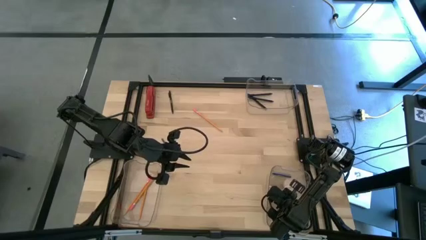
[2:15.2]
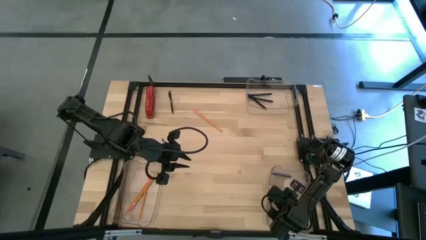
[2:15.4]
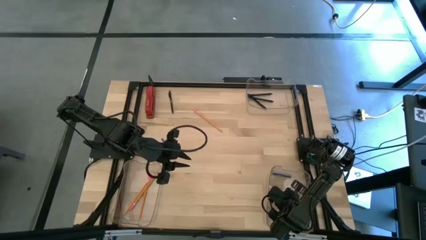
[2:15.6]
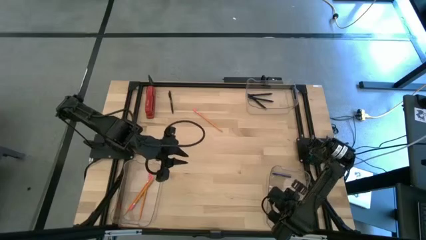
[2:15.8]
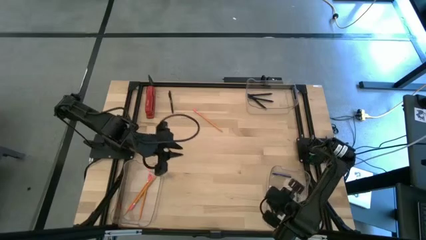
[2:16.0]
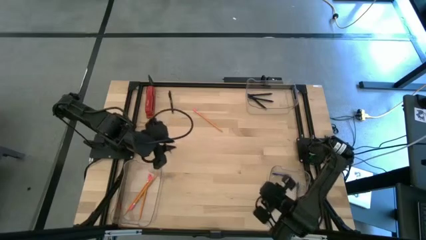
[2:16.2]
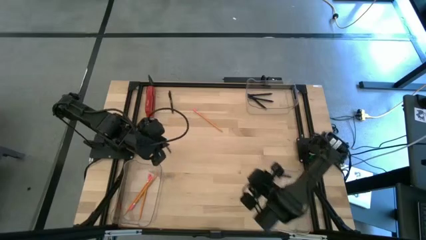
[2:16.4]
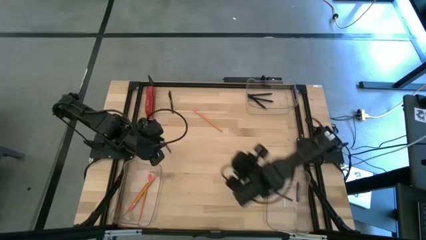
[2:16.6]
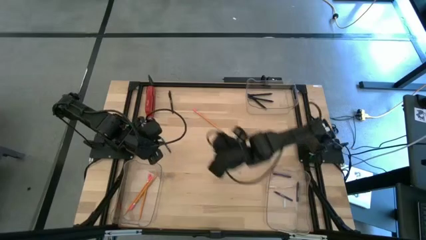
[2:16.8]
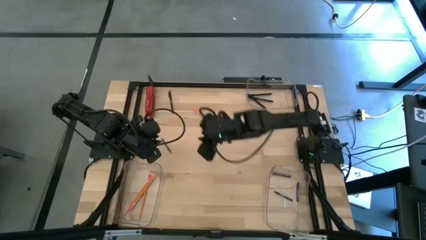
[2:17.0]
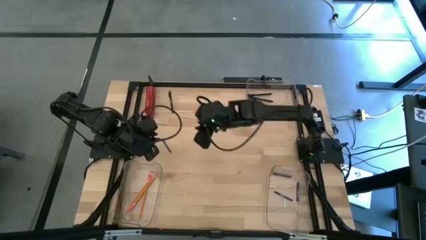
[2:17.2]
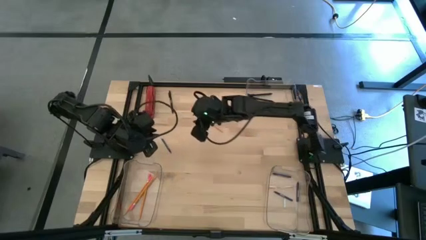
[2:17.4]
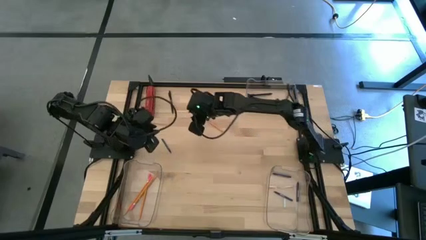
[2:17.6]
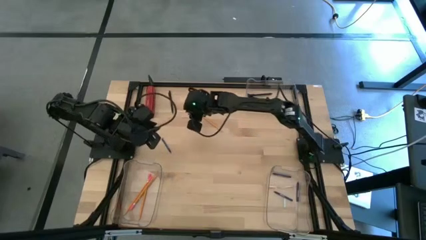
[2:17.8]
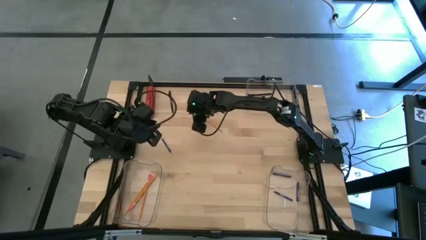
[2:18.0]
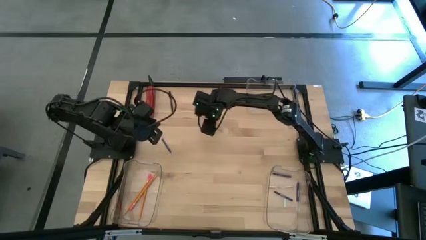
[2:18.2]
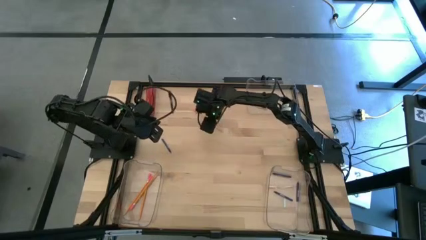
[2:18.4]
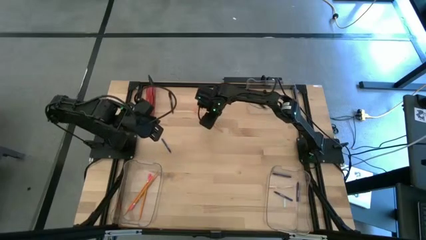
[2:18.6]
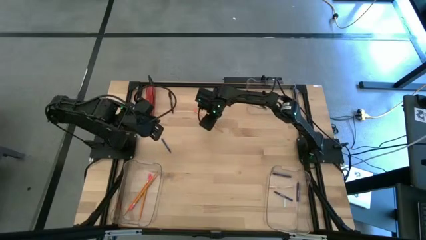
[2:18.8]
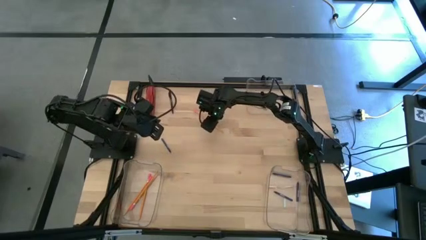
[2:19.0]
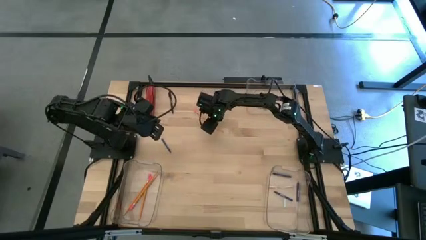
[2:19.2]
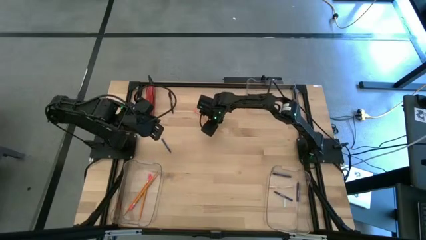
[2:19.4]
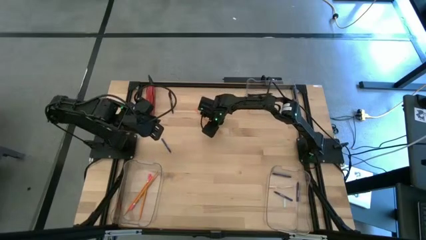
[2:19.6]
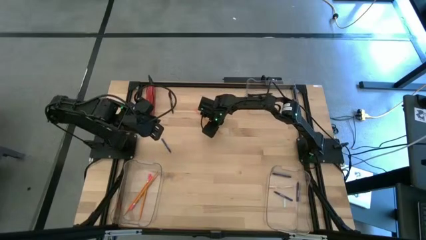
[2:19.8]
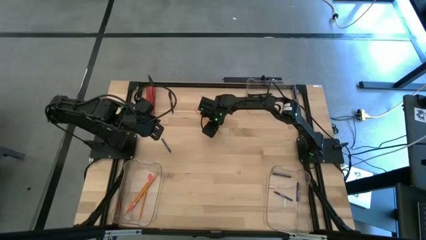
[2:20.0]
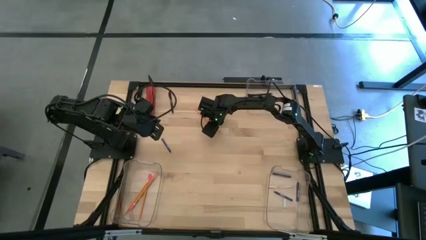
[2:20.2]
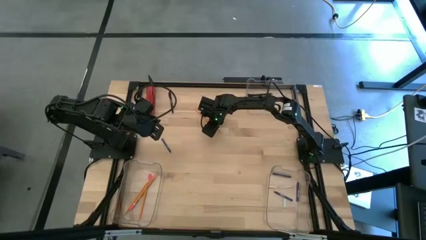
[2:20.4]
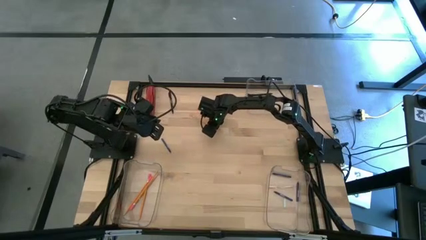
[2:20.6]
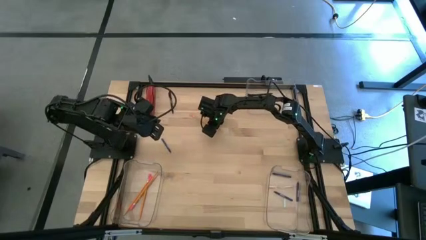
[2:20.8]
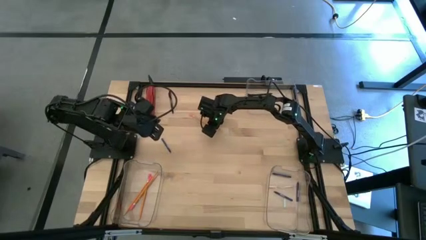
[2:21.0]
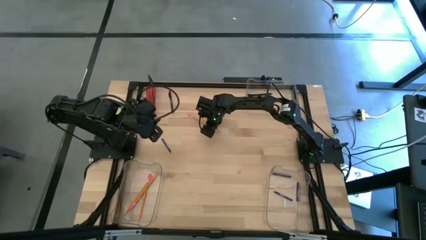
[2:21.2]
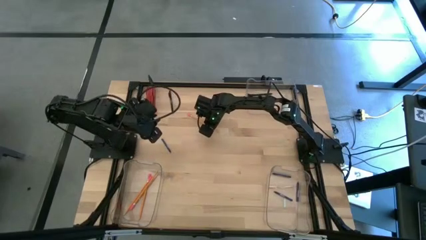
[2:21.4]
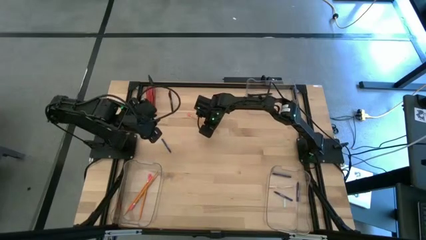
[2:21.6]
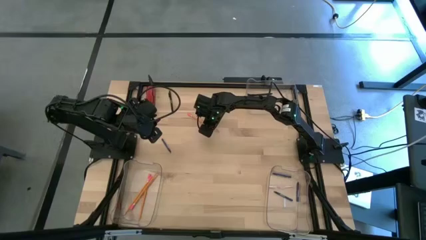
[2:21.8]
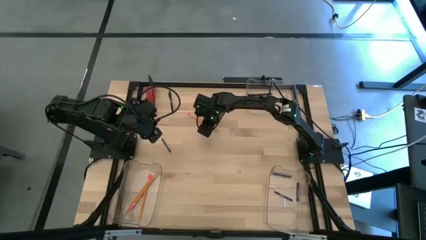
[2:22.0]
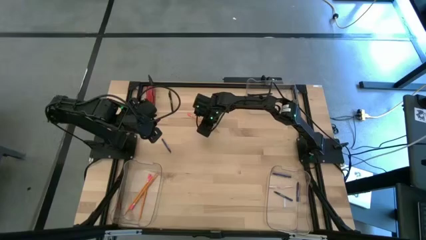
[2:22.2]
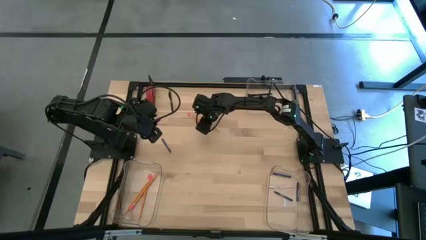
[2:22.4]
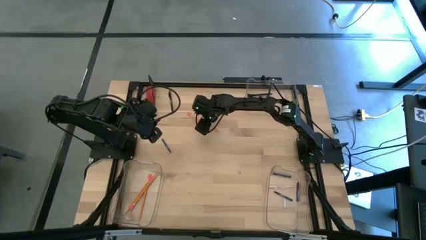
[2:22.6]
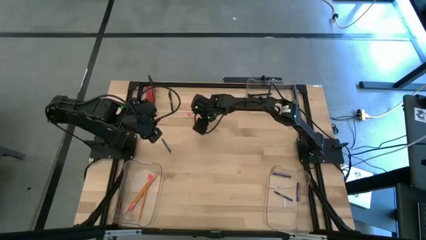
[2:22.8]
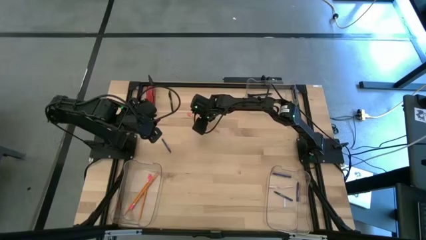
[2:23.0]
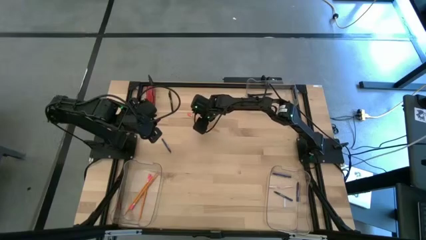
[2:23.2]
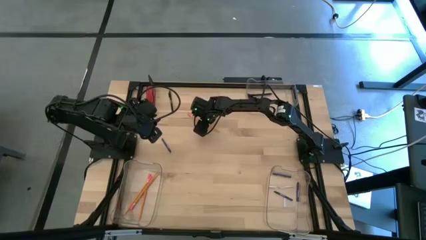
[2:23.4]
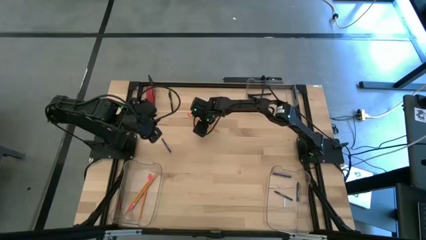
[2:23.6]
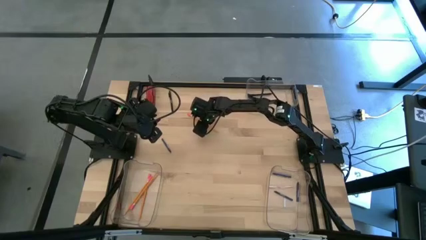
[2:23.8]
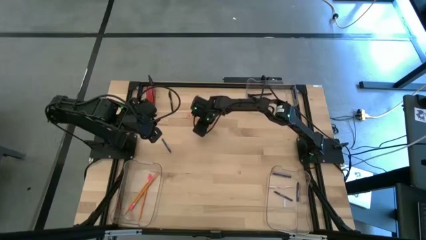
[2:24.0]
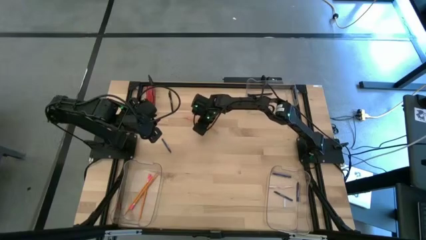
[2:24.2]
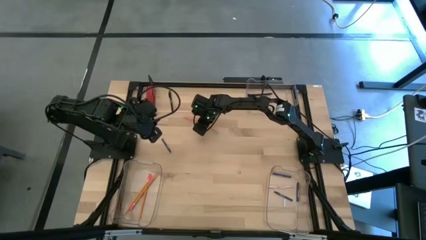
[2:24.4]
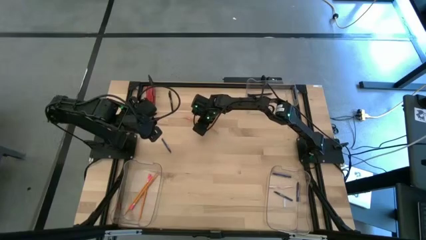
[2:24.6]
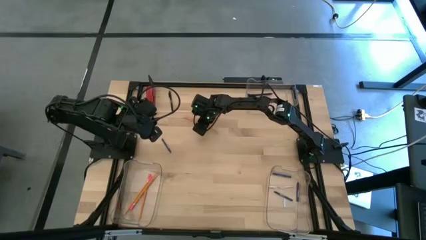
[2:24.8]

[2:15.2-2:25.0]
Task: Sort crayons/erasers/pens/pencils in bins
Put the yellow pencil into the bottom left transparent bin

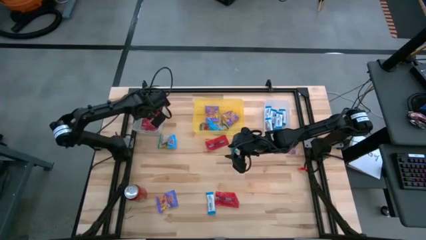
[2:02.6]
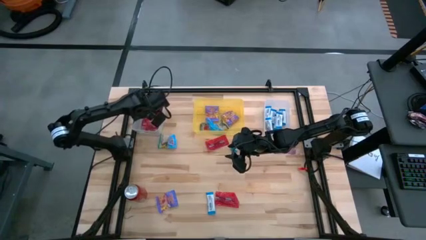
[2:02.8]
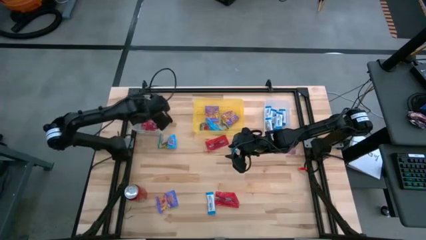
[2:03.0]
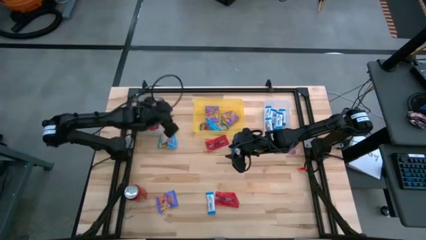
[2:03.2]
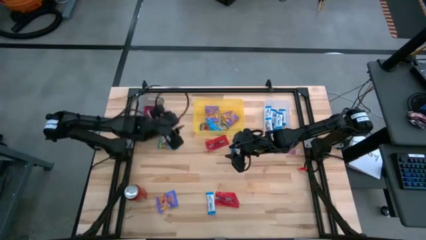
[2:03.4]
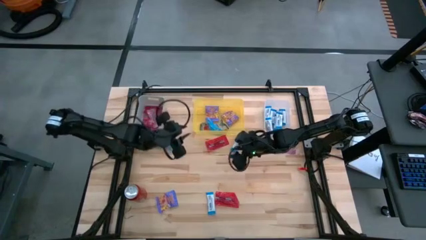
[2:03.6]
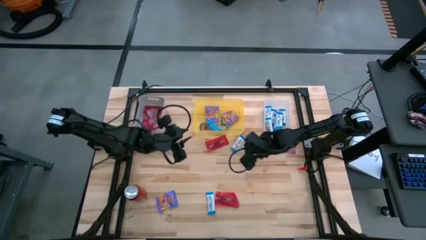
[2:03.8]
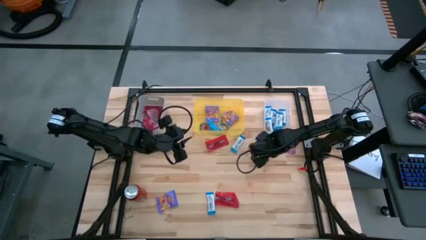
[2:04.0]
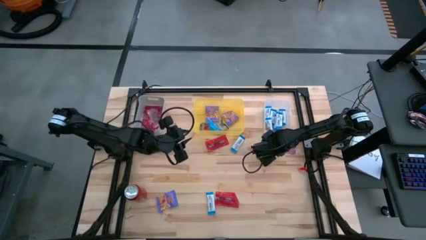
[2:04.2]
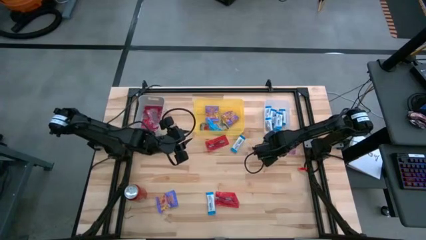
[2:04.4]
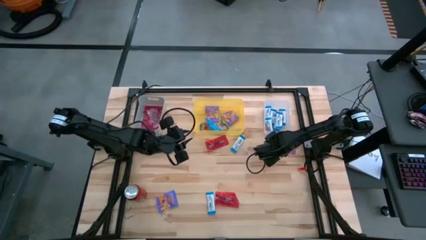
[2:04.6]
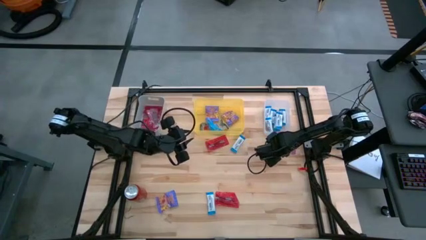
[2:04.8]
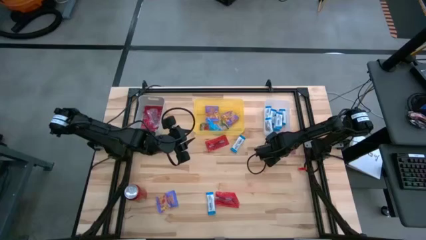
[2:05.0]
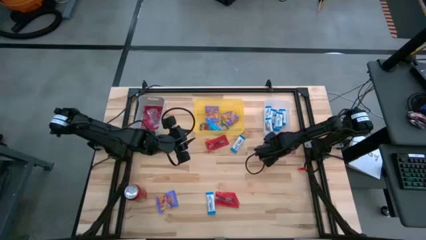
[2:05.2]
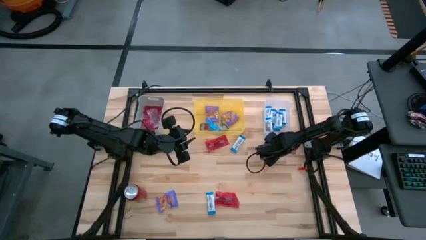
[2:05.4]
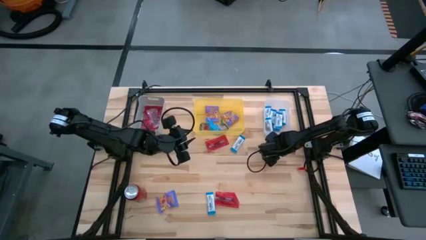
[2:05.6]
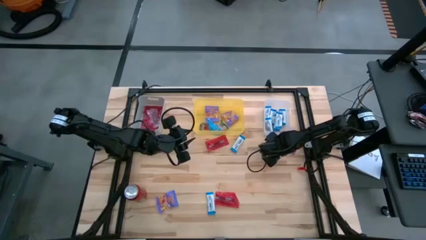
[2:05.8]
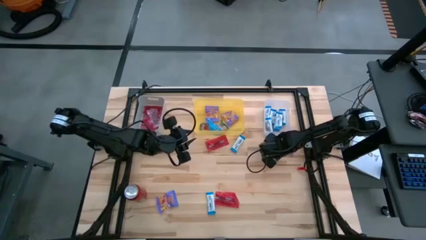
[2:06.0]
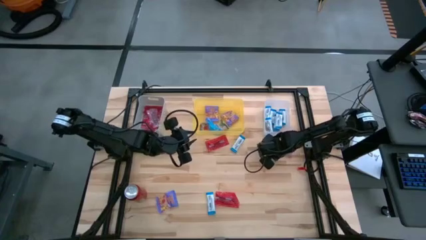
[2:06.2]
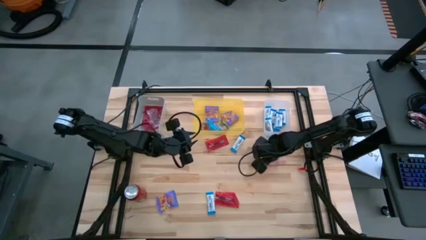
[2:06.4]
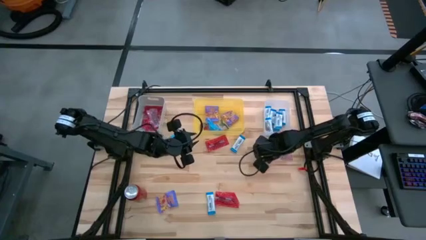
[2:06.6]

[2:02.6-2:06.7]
Task: Sort candy
Put the red gummy into the gray bin
